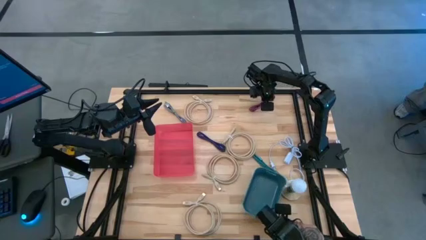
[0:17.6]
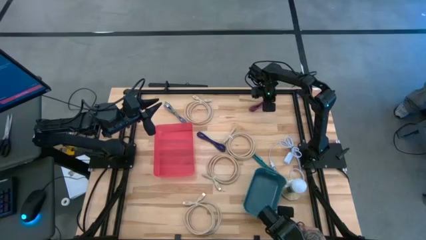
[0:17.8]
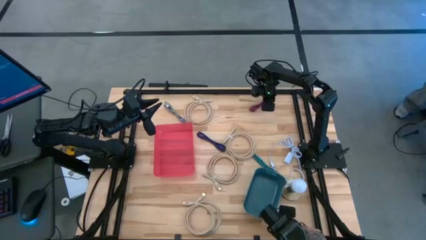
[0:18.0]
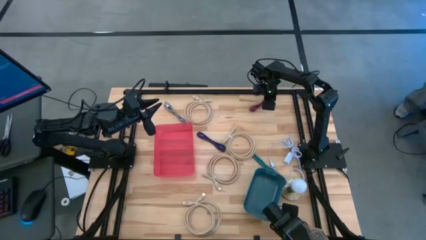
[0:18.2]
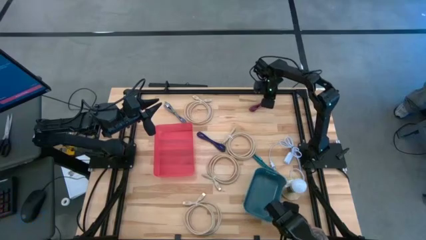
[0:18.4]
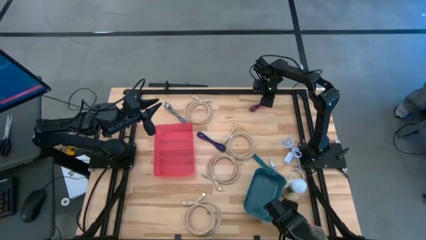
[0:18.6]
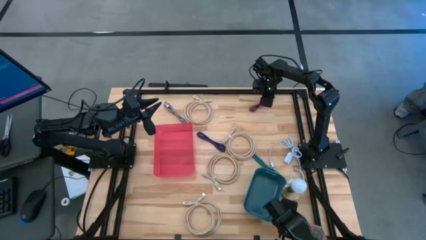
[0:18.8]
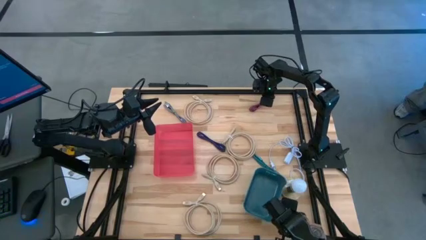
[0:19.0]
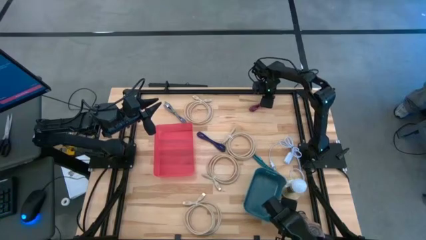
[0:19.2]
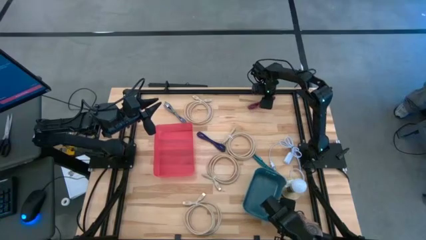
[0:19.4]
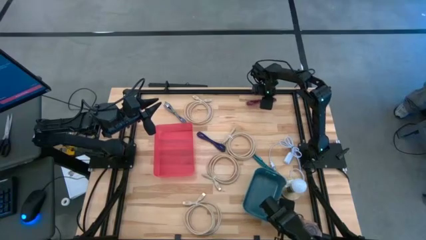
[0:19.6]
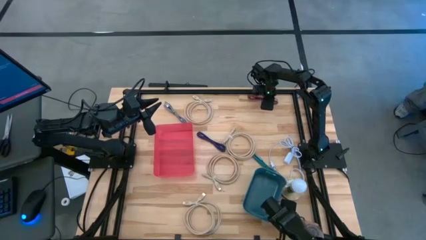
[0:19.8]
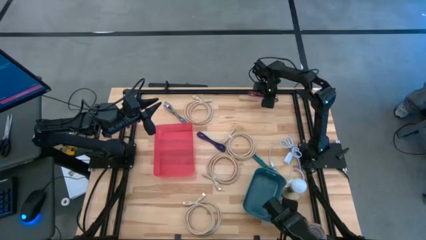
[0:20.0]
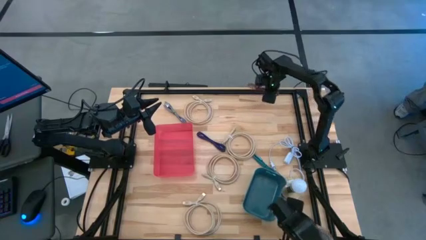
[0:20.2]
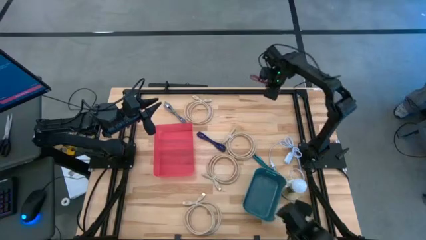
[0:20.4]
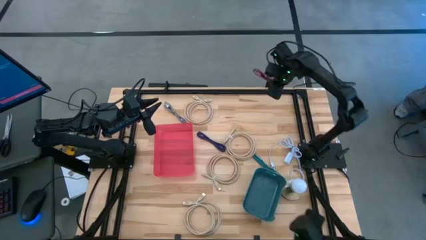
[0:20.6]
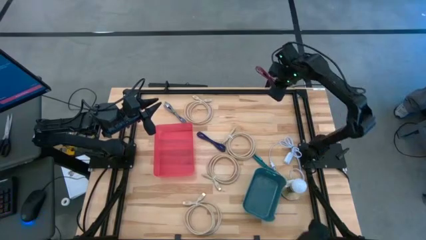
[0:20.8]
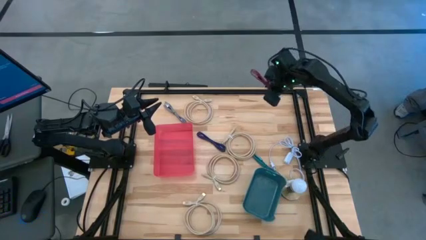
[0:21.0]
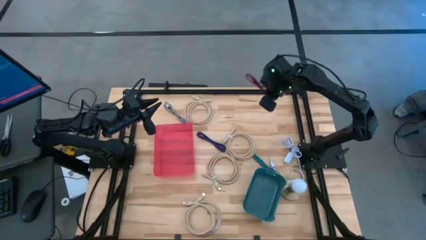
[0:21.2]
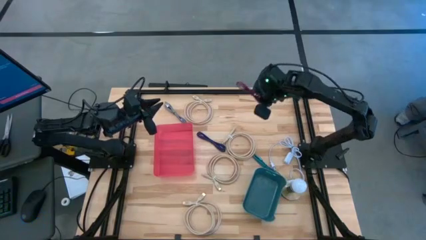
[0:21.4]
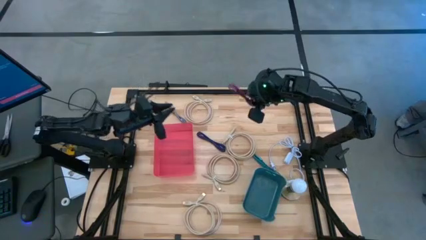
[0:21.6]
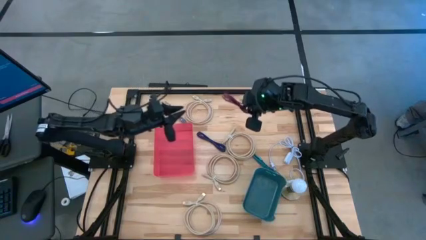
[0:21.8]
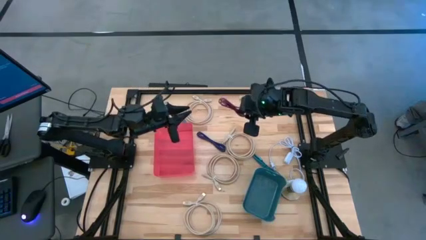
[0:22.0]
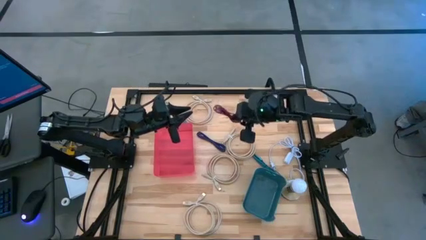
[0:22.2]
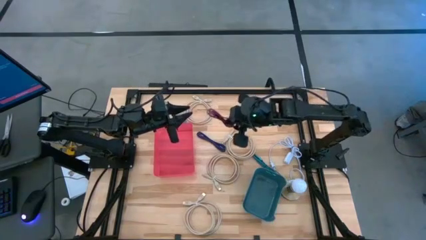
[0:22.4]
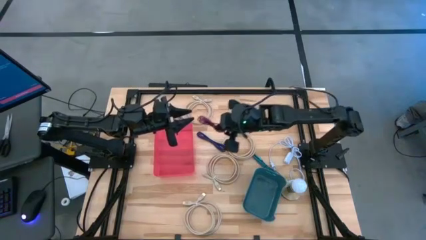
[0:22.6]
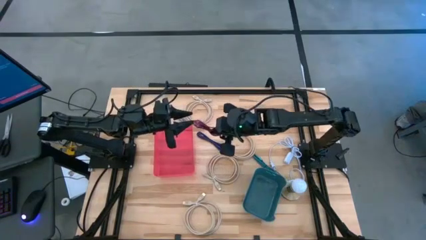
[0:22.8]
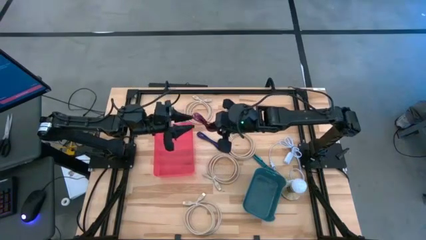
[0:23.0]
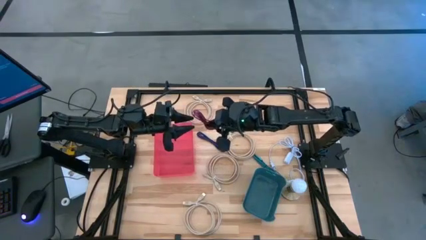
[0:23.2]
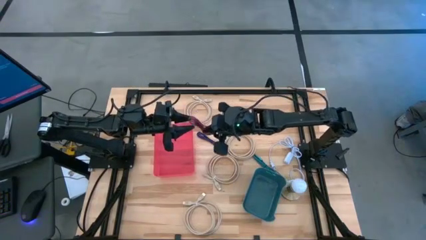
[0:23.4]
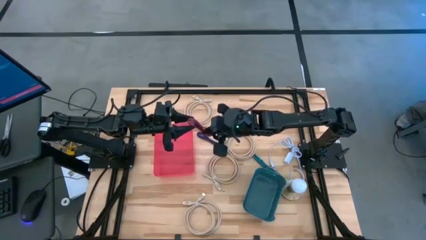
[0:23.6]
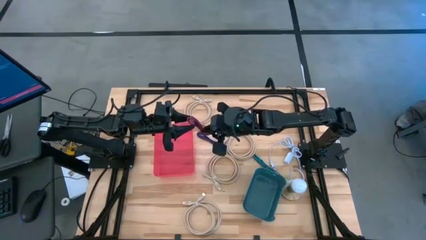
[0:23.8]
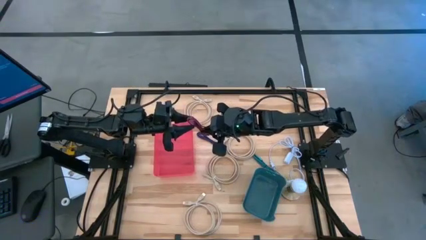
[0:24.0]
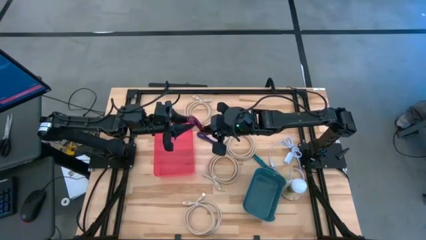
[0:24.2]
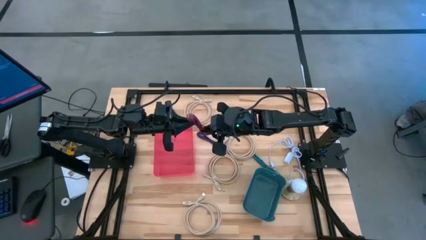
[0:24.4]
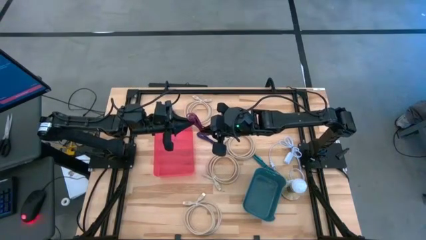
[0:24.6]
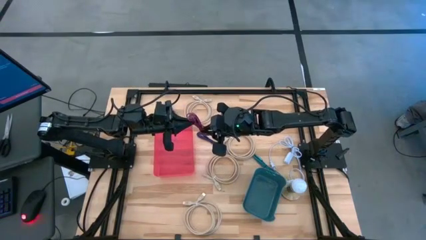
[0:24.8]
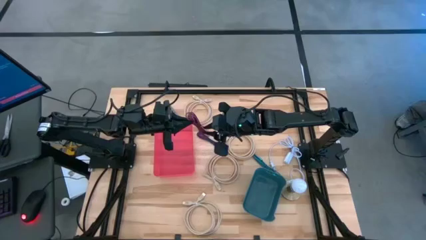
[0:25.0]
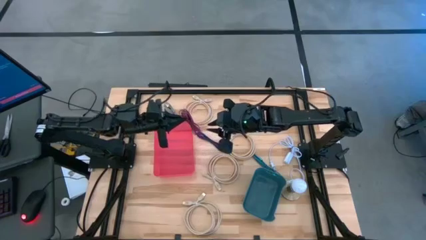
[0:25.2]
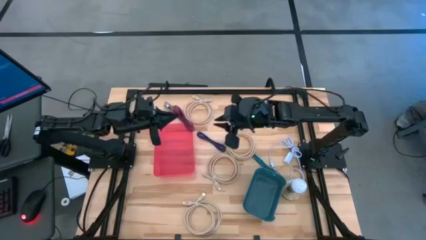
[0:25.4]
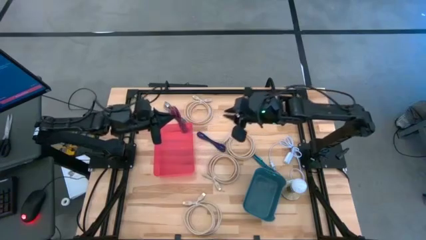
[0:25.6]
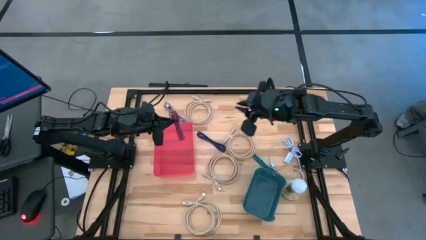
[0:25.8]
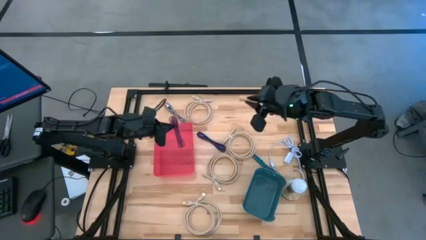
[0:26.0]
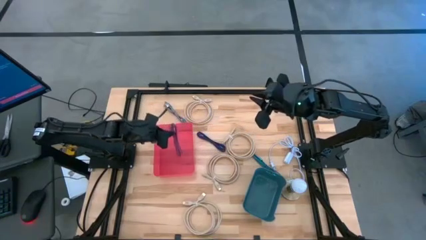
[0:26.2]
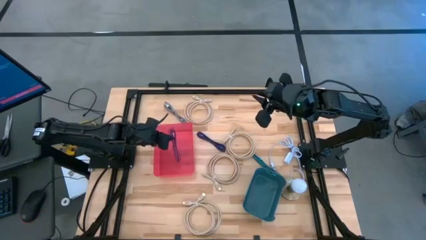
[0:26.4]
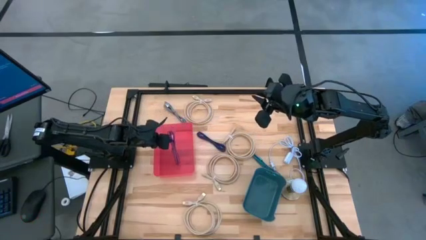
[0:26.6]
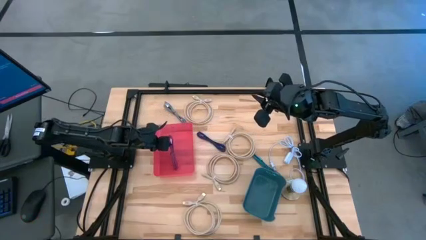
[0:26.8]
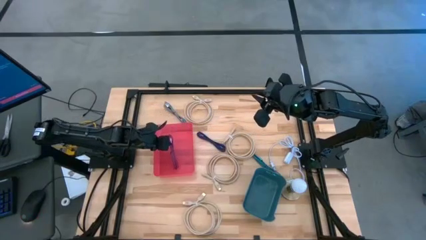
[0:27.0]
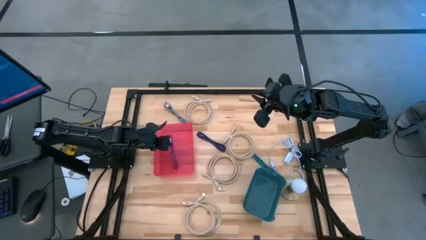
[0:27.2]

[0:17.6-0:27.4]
Task: Pick & Place USB Port
Put the red charger cable into the red bin

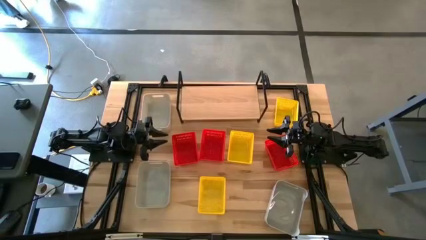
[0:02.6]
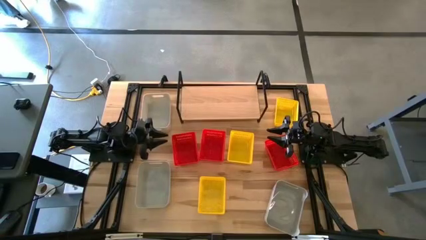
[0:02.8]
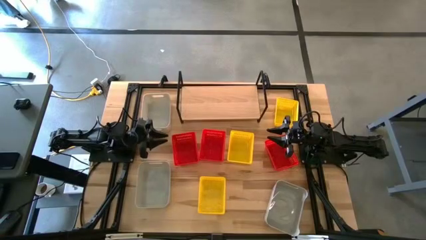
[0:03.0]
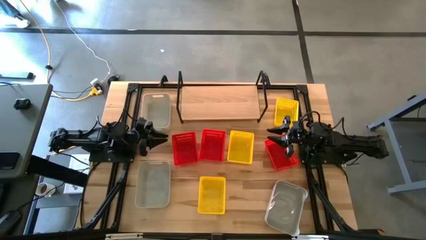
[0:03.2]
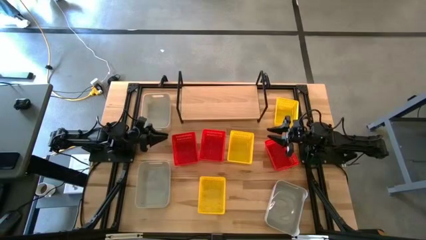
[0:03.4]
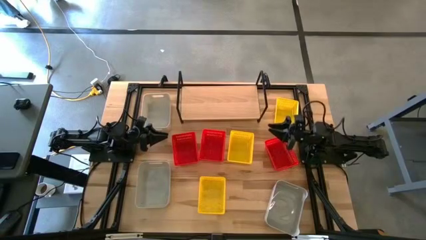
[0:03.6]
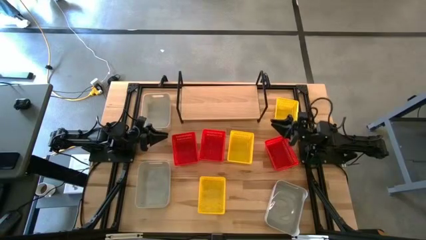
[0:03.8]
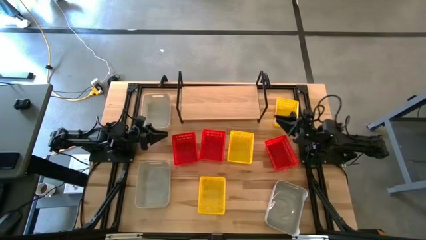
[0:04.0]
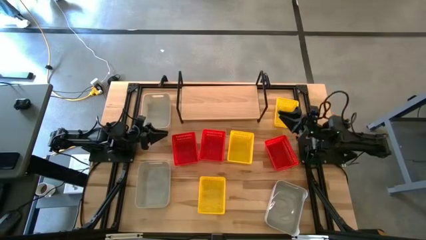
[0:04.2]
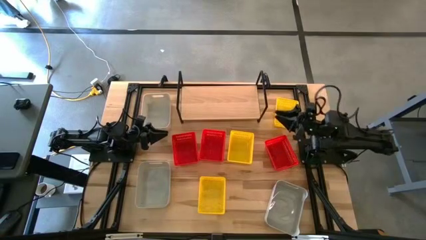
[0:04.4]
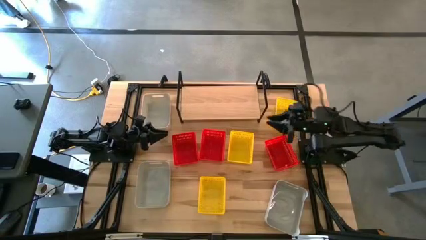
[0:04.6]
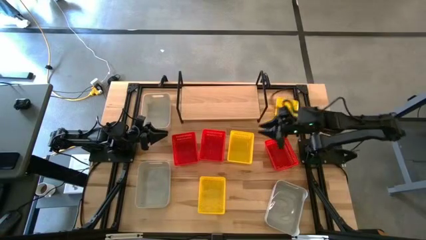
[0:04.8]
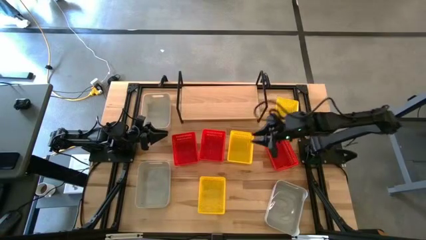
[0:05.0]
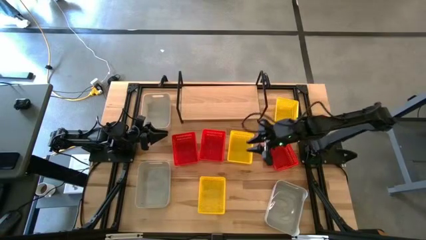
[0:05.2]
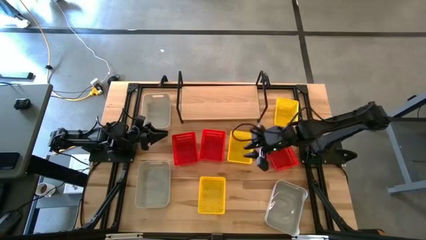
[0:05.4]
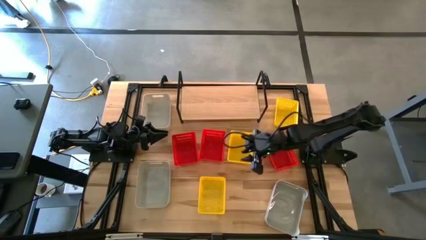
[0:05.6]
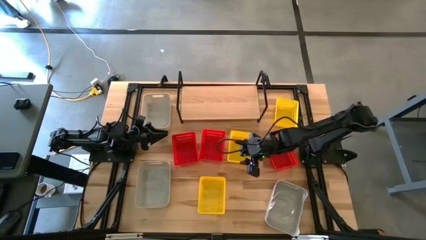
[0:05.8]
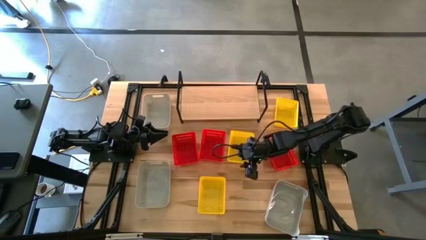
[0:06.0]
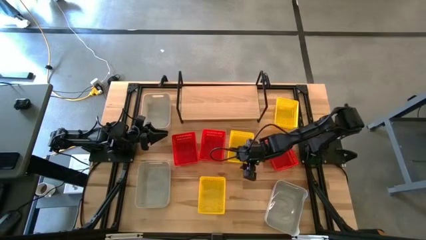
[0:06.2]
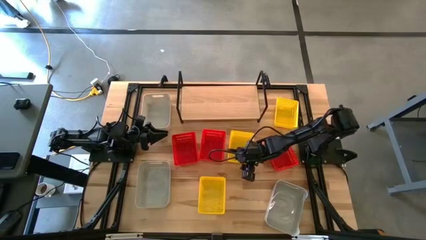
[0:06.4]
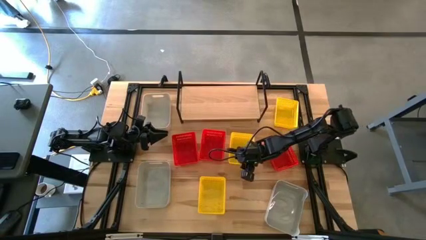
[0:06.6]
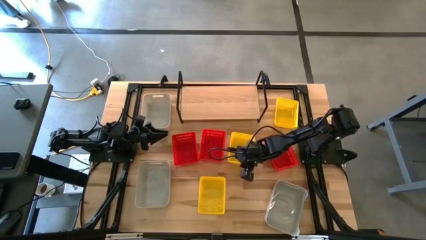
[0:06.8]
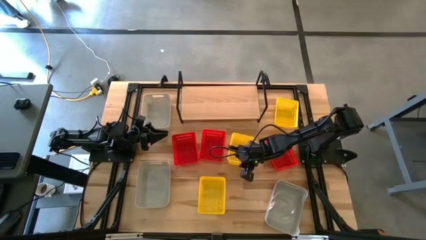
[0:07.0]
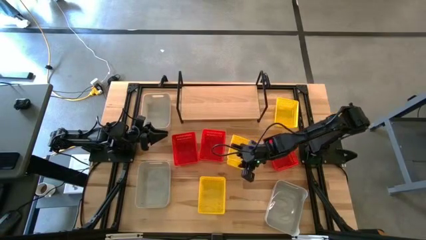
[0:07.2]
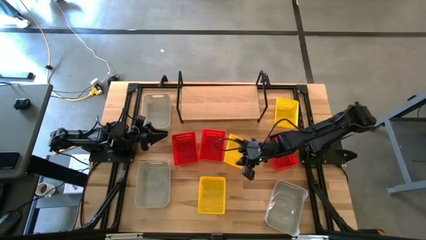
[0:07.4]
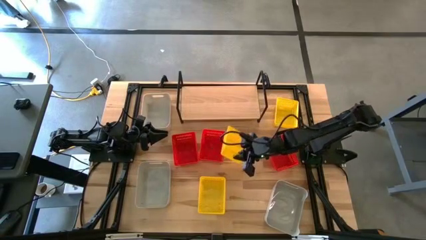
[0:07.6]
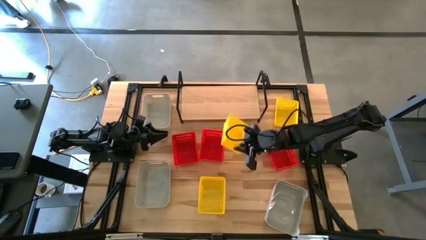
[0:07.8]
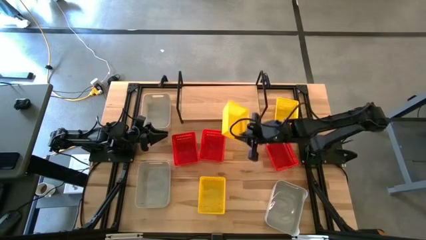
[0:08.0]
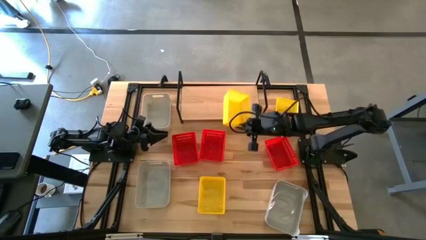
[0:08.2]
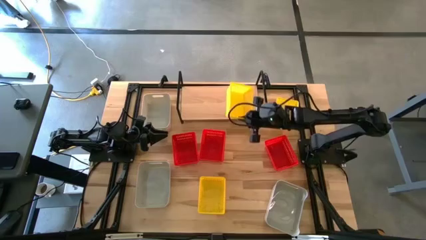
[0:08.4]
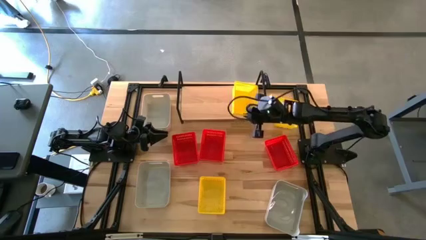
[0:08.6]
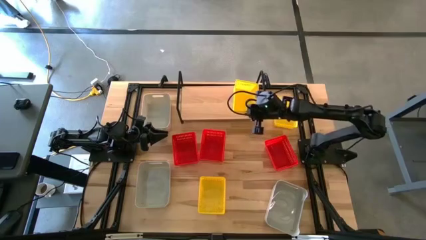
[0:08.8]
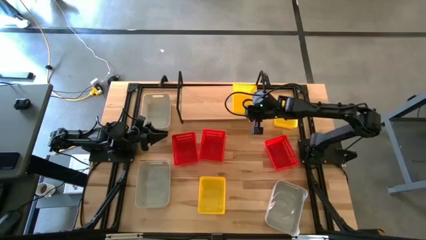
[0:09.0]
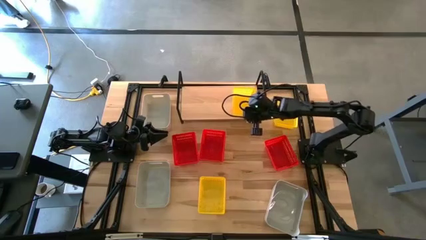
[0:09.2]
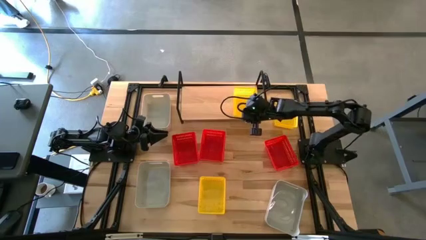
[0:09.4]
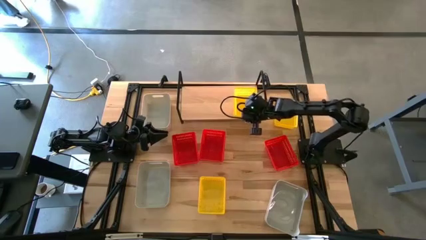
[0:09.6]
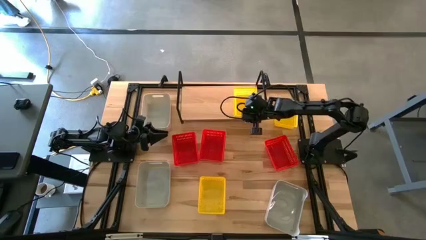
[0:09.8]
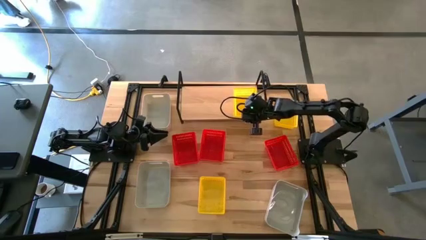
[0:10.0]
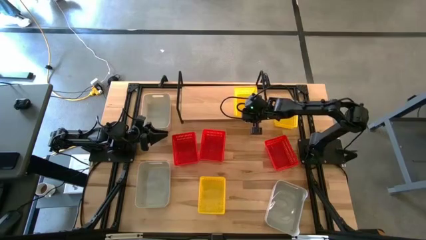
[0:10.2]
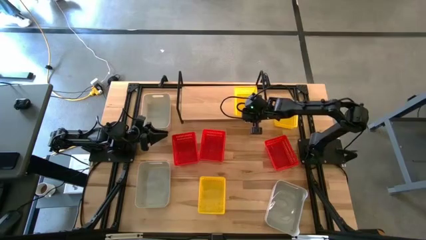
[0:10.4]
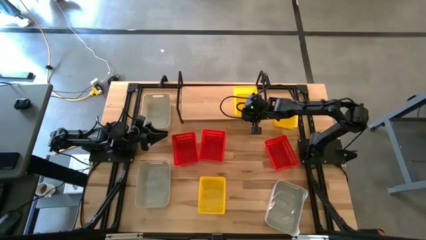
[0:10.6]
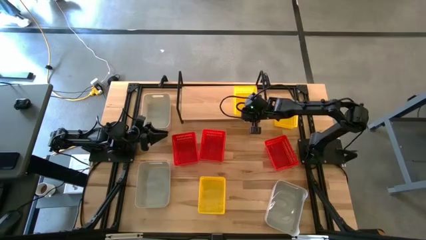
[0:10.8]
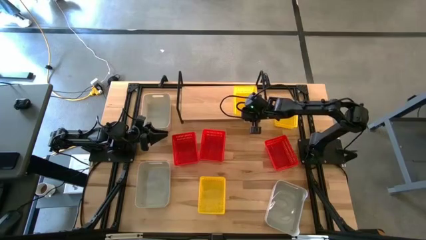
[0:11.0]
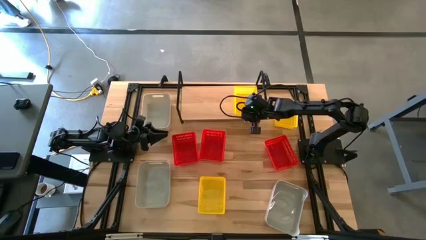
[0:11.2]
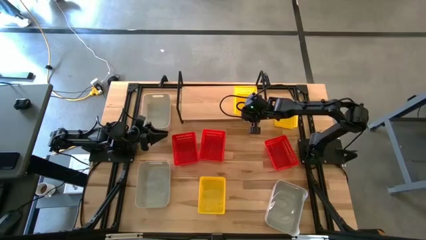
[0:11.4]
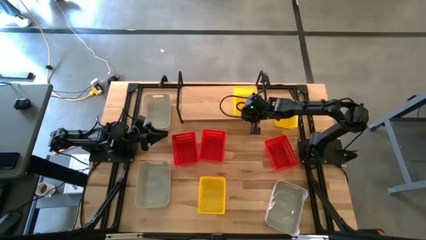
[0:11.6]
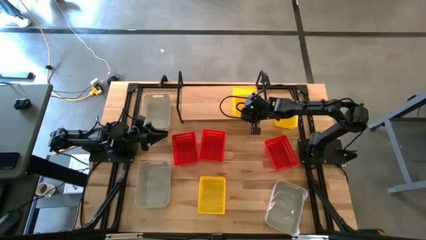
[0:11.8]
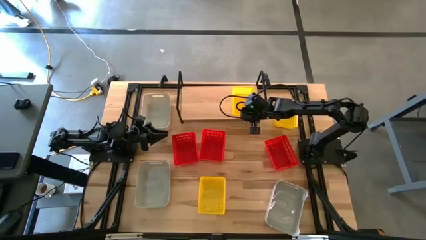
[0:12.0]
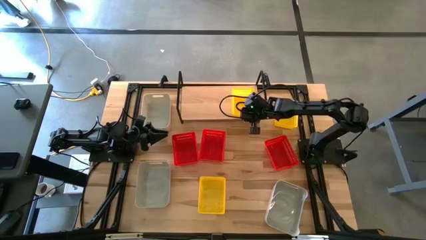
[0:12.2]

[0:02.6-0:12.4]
Task: Stack baskets on shelf by color
Put the middle yellow bin on the shelf
